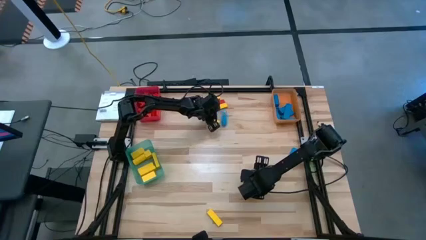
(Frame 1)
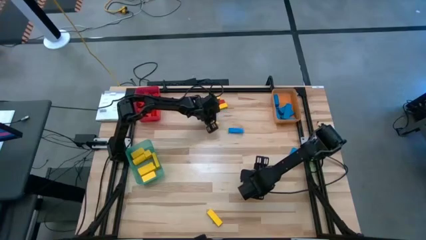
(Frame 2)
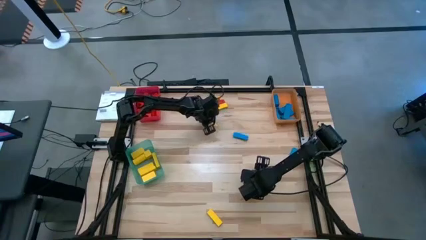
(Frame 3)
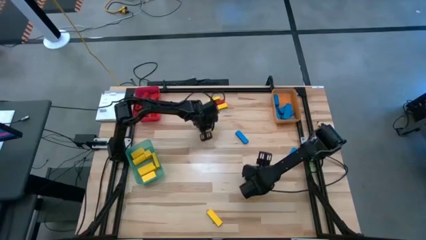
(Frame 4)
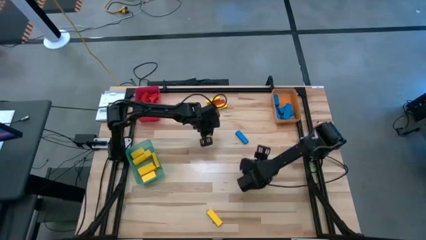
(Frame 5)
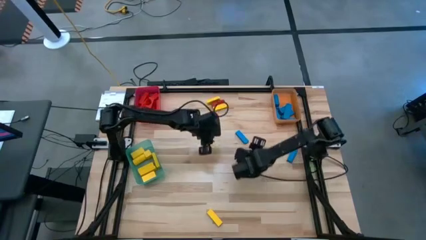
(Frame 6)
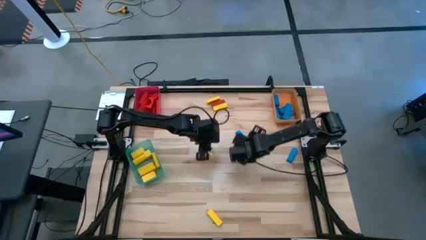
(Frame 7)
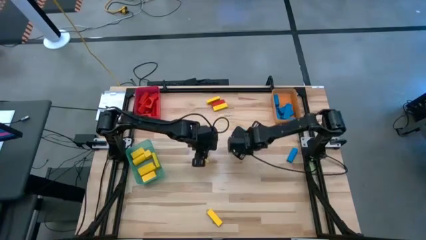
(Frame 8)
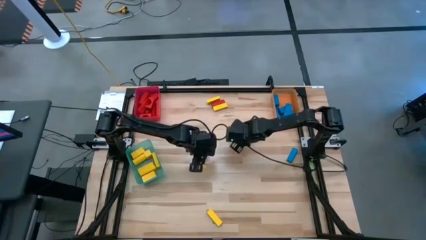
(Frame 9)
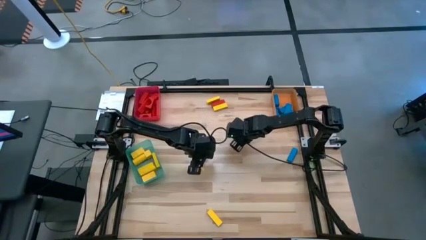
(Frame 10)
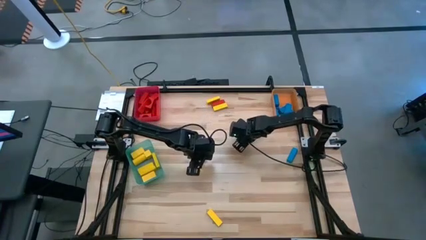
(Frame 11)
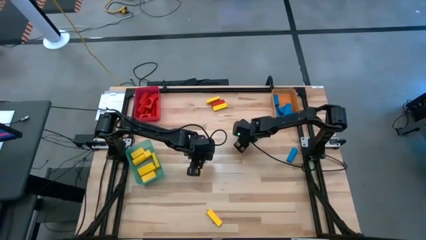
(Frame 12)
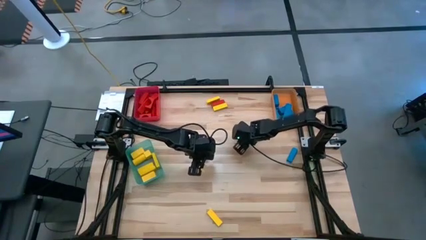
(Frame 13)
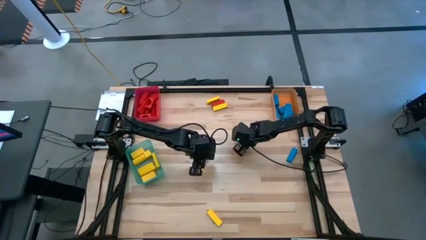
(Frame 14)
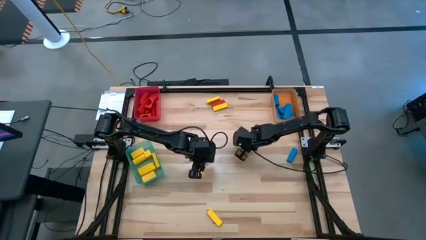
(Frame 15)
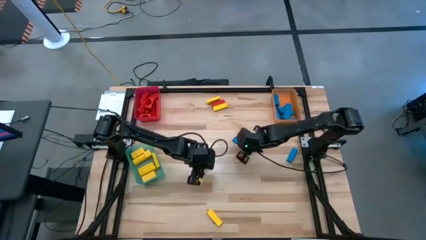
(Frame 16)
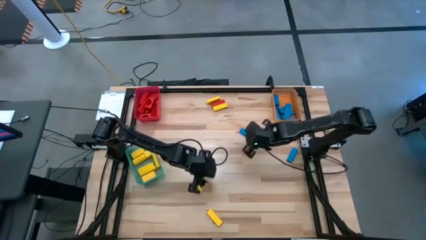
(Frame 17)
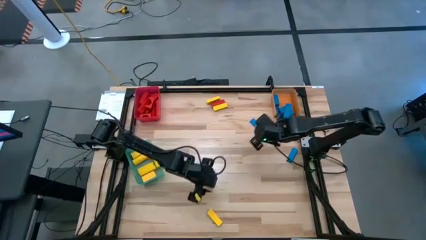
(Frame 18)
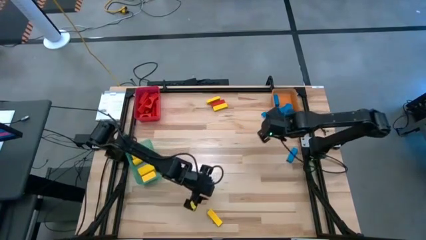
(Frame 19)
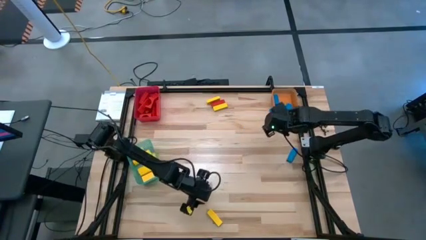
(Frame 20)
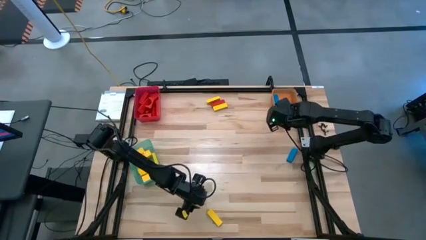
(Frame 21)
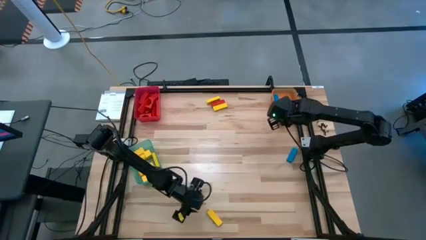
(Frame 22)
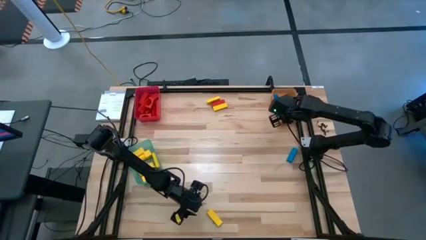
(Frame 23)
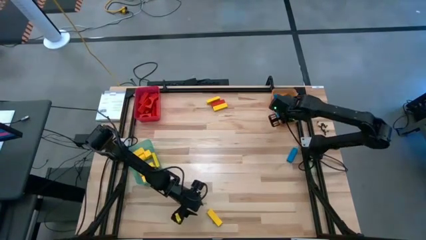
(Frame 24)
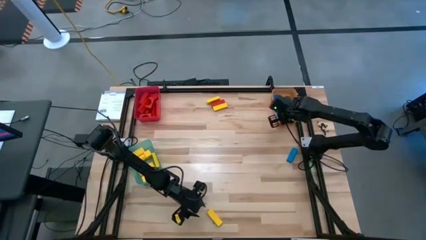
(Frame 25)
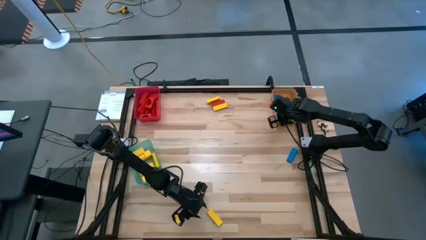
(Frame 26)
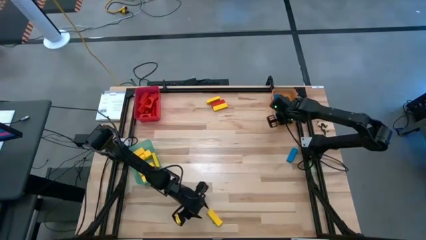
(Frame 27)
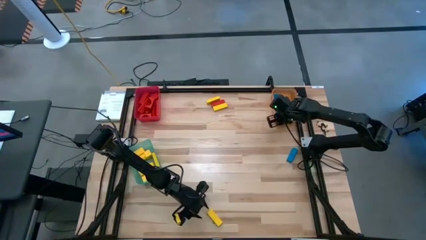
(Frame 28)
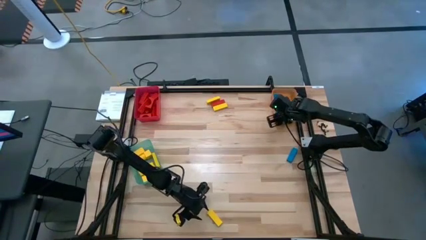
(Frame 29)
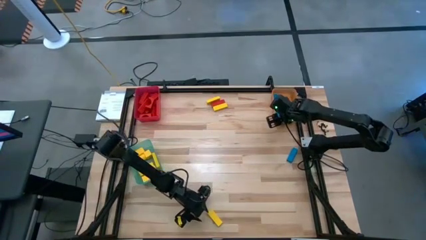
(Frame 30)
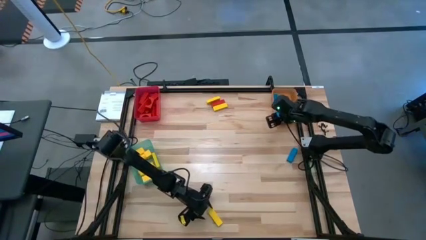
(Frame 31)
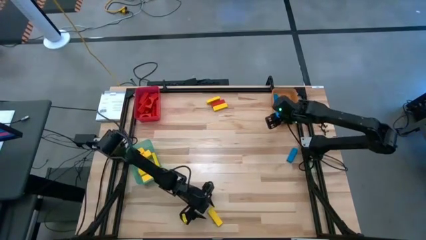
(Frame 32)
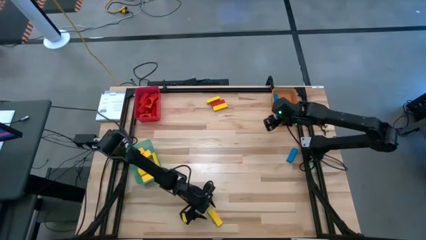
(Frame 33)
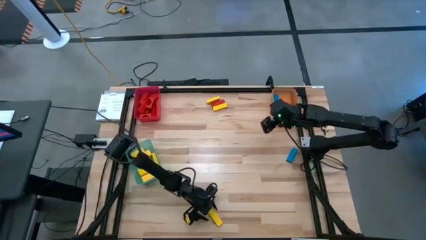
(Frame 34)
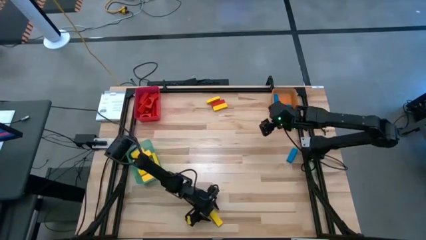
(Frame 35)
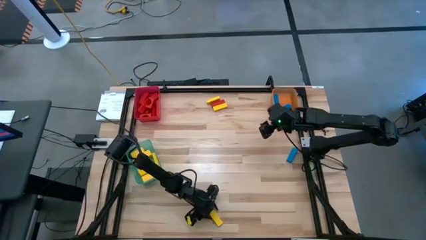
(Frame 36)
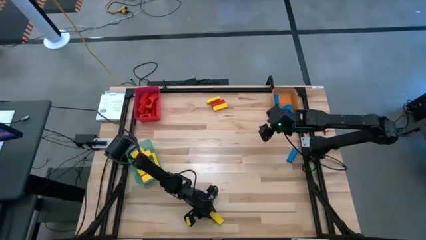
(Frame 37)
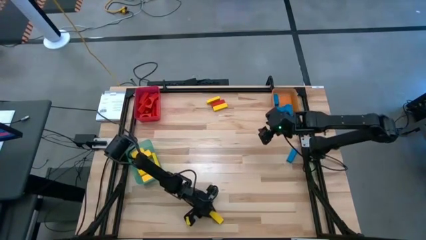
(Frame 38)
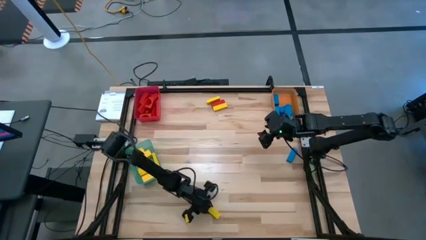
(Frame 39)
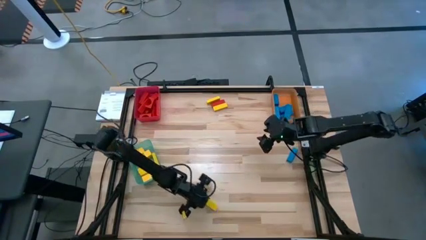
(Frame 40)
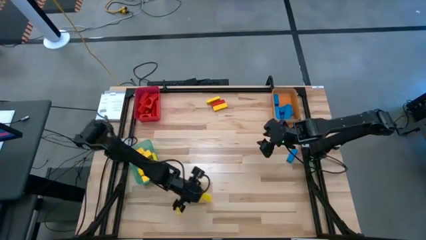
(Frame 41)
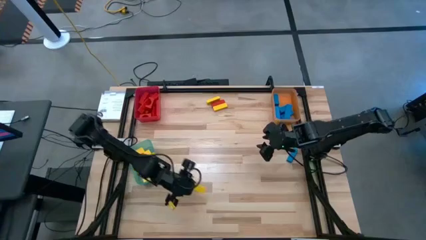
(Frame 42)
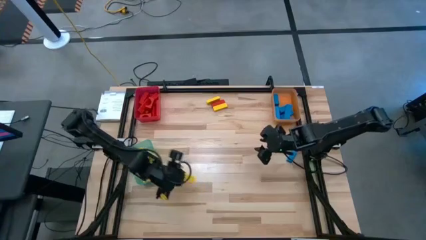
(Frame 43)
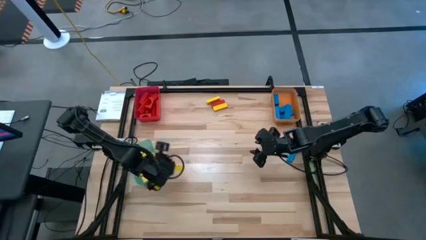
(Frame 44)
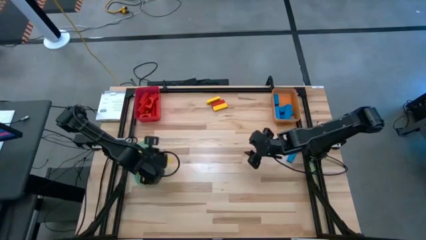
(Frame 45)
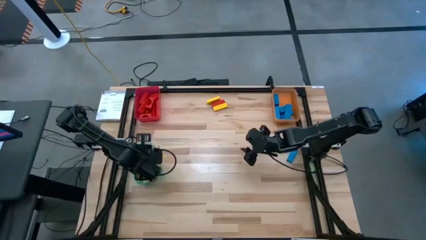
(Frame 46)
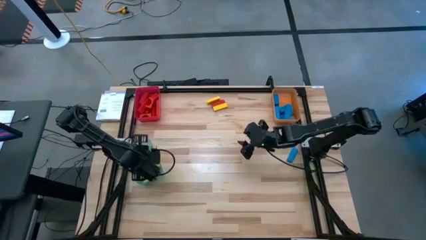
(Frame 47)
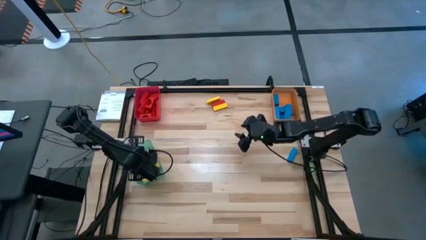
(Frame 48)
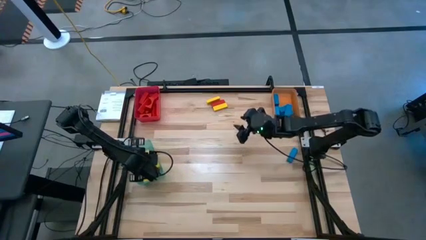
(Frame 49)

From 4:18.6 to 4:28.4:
Task: Sort blocks
Put the yellow block into the green bin

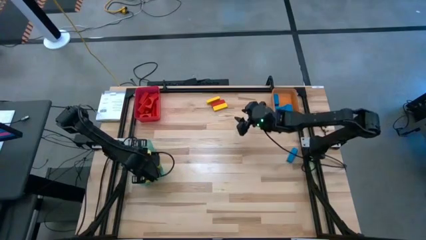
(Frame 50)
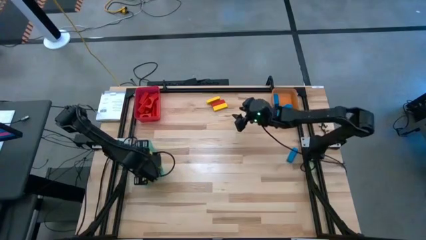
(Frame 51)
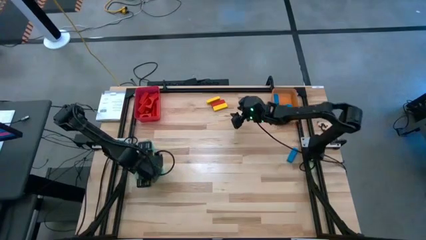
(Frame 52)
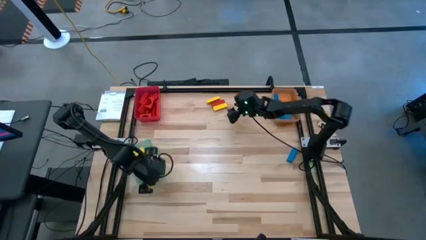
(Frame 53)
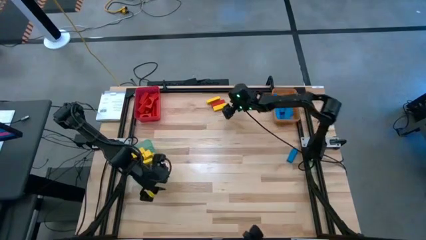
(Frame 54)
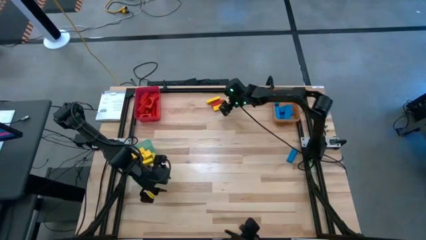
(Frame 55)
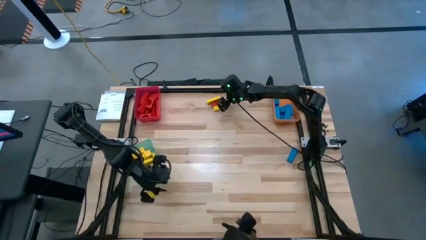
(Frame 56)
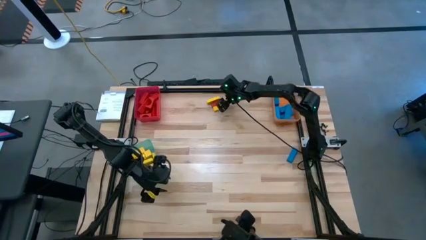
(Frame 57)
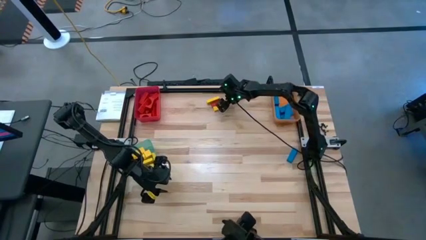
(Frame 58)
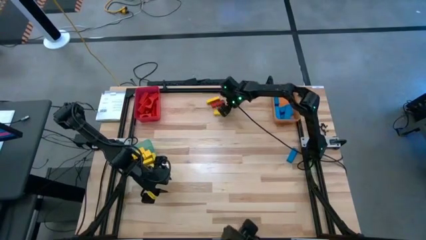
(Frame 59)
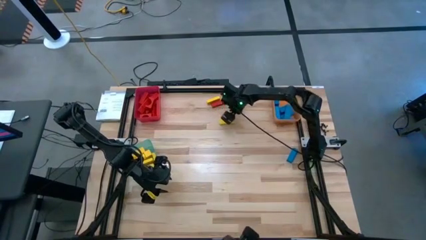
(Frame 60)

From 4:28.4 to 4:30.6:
Move the yellow block to the bottom

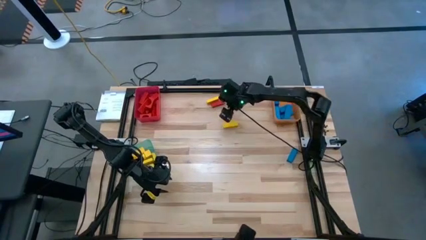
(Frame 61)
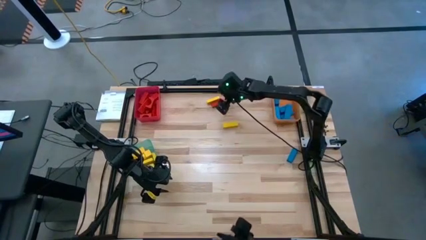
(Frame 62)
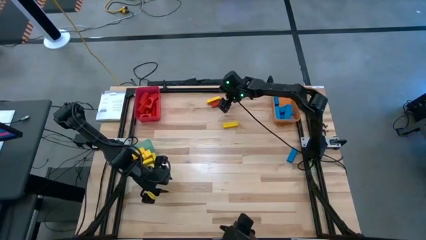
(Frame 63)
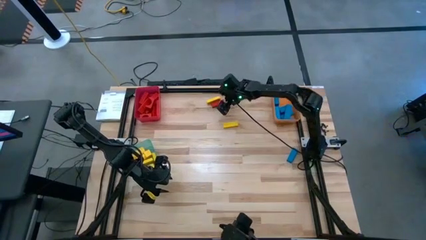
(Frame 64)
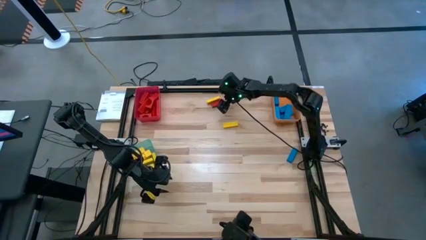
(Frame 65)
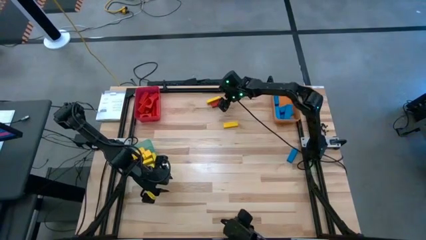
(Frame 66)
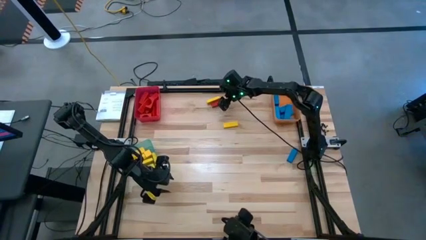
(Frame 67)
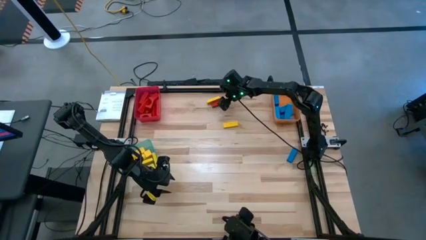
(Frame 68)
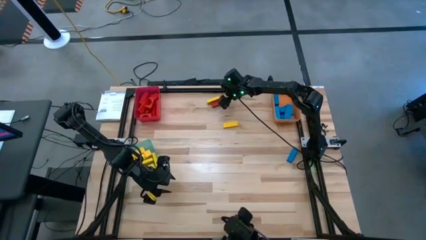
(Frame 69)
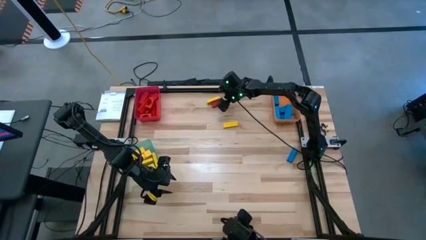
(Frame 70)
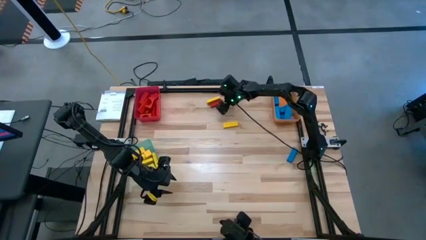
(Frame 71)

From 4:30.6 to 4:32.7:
Put the red block into the red bin
